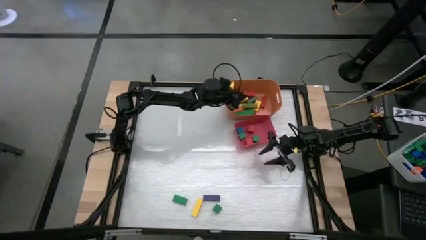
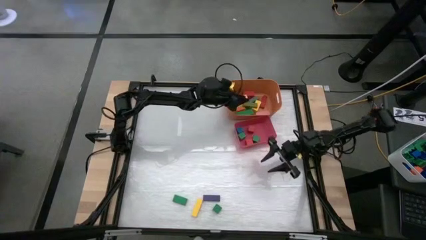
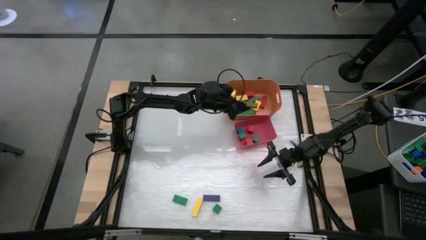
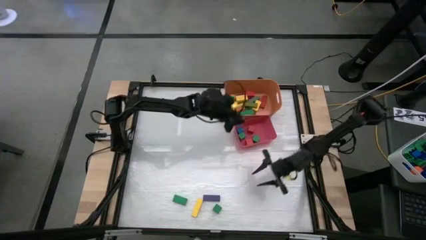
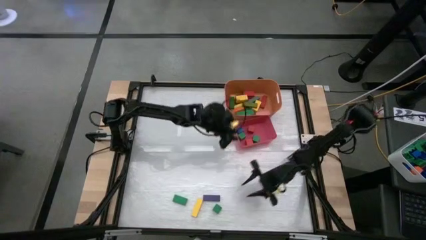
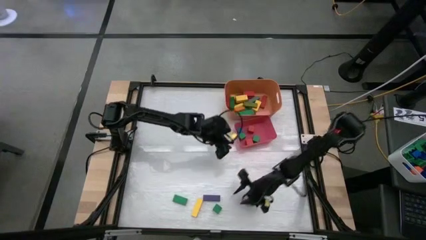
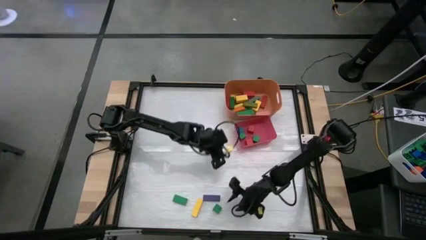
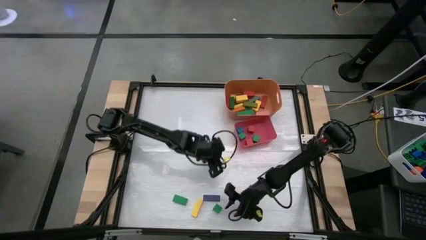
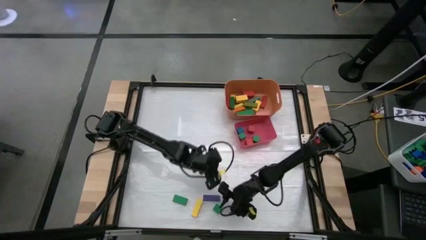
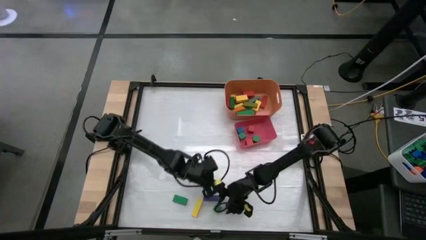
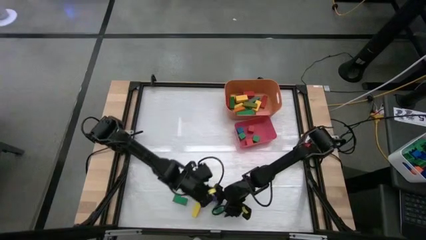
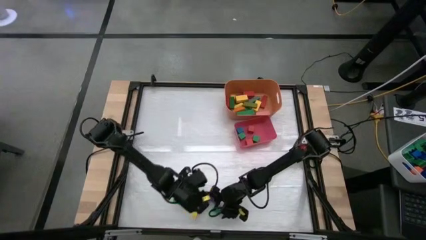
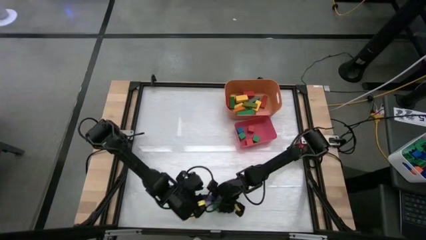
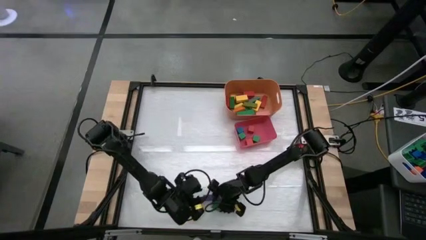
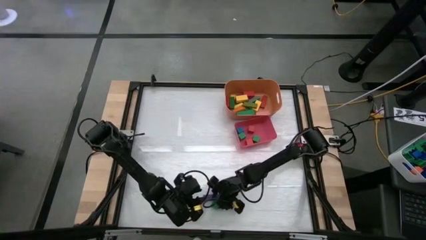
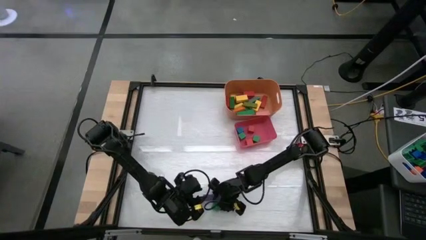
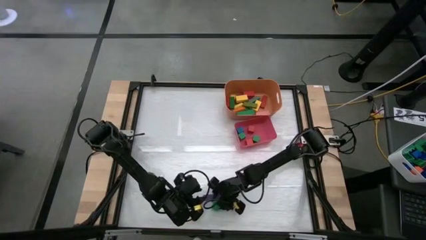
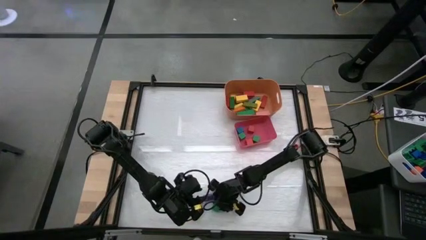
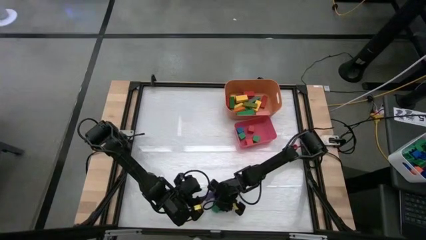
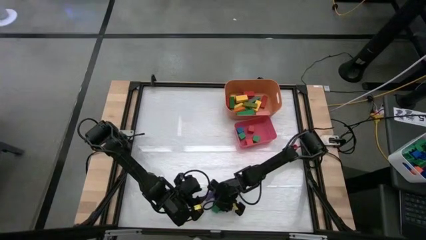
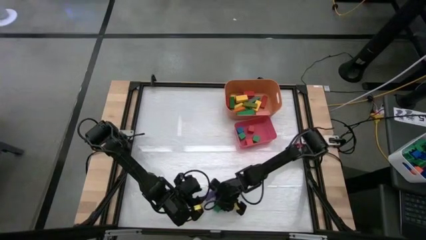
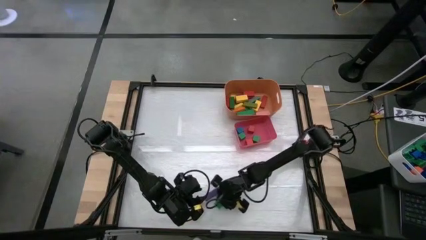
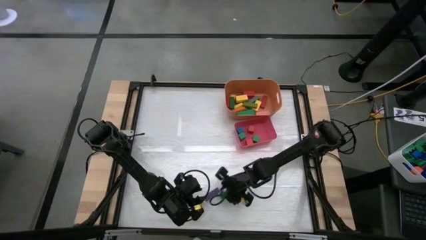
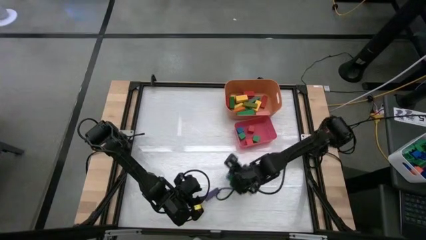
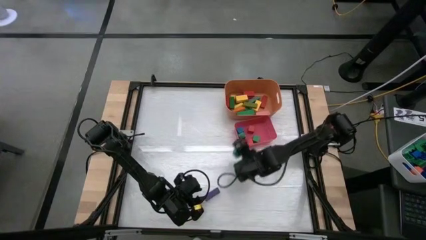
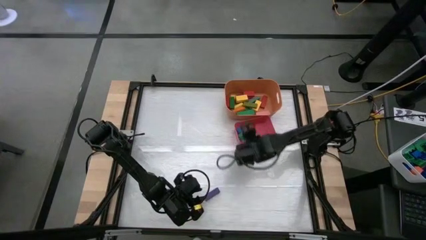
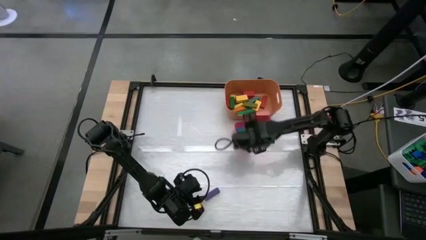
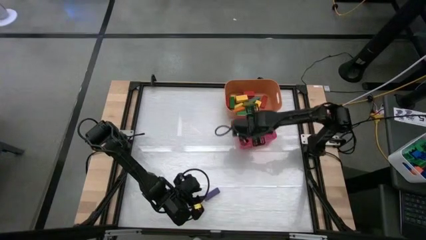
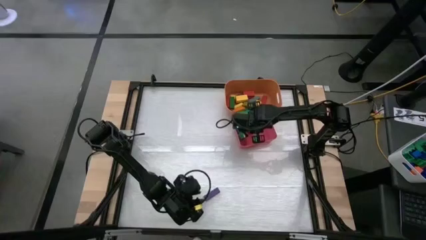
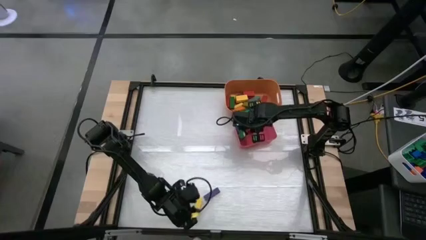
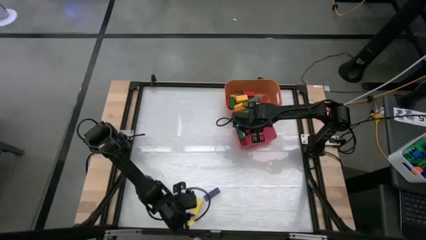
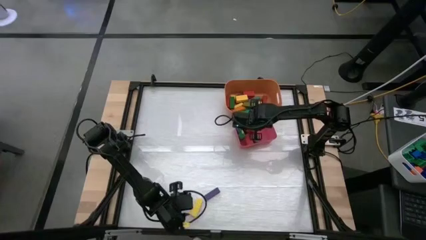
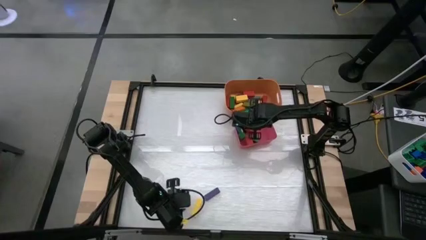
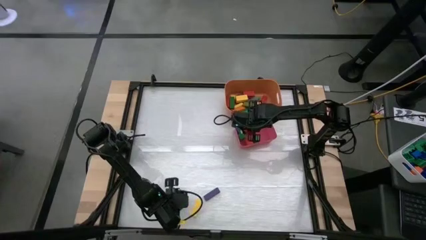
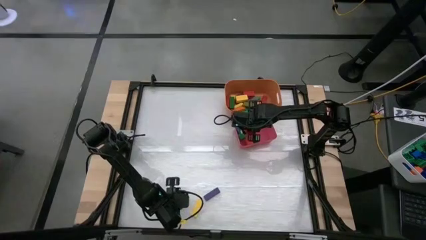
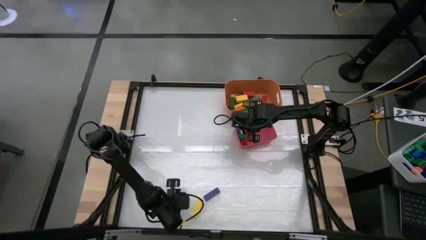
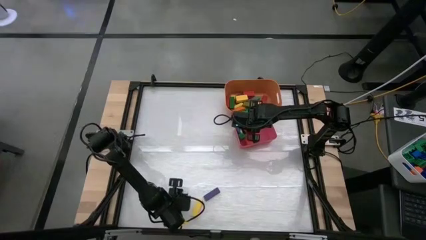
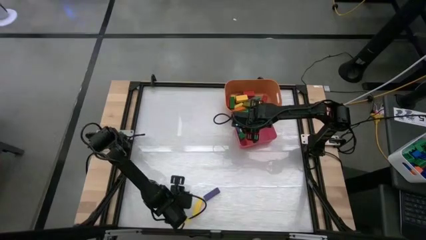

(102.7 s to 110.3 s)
Task: Sort blocks by size
Put the green square block into the red bin

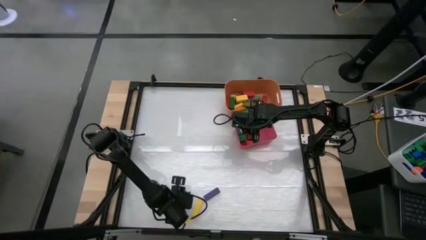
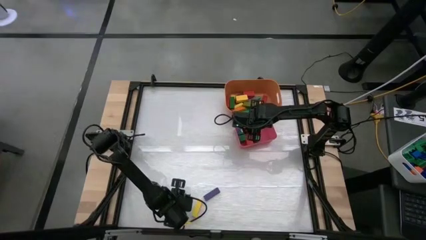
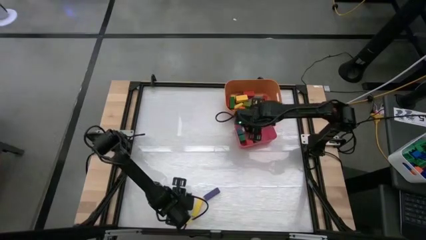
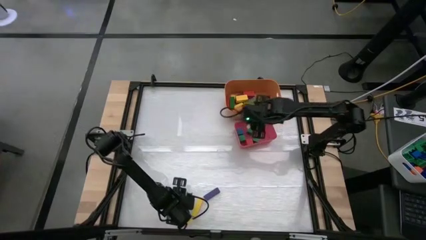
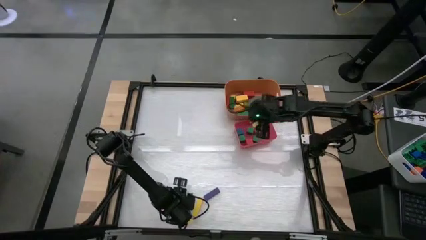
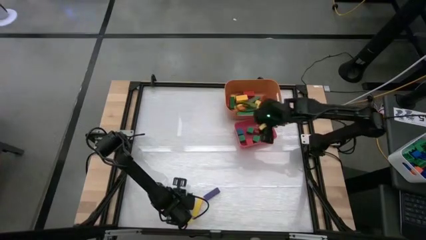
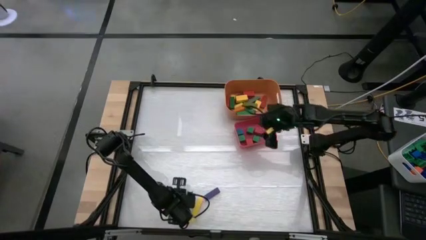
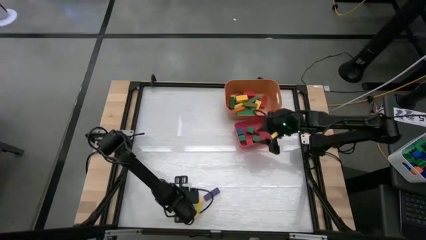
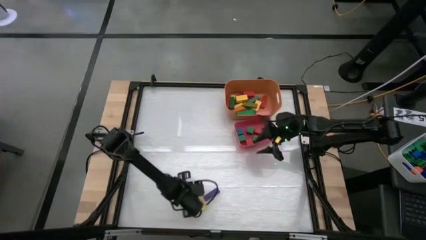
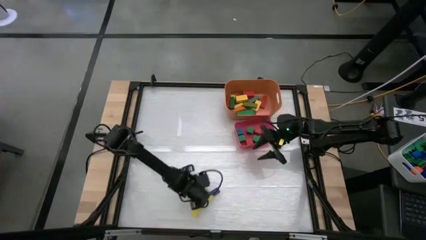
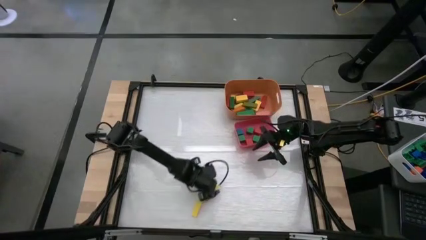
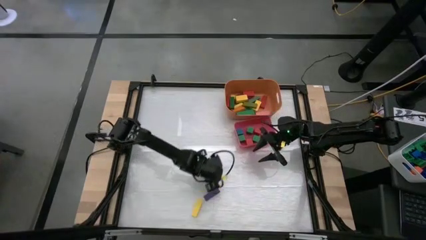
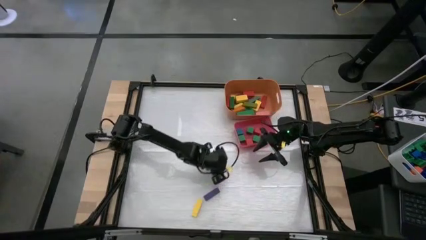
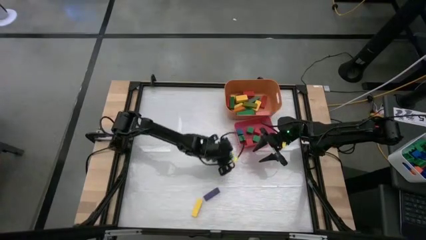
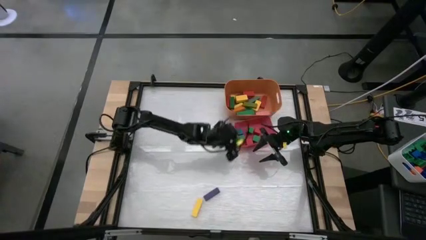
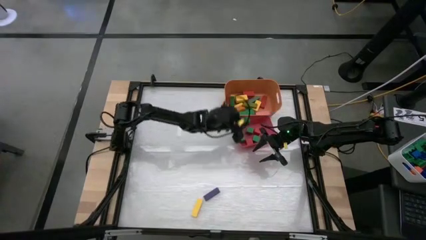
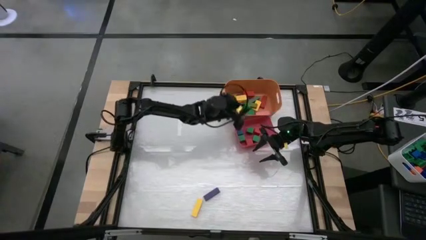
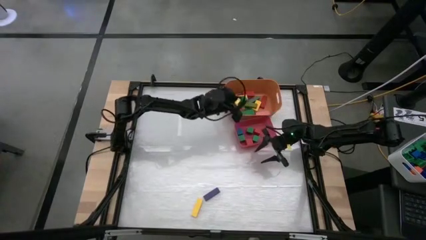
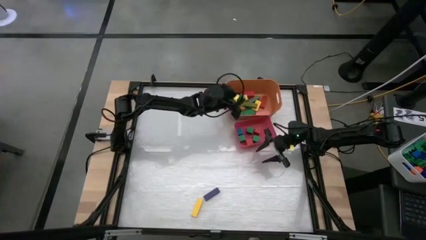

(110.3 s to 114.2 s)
Put the green rectangle block into the orange bin

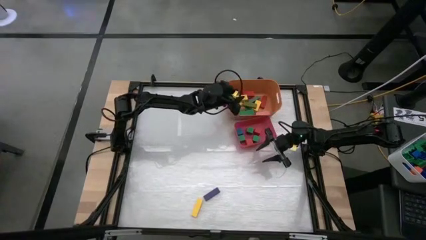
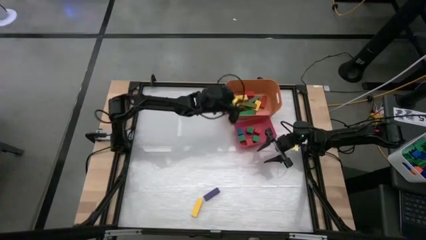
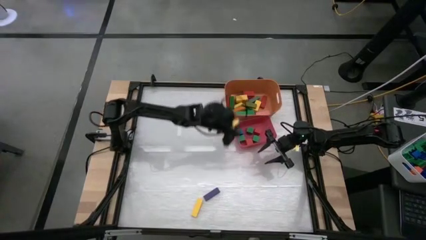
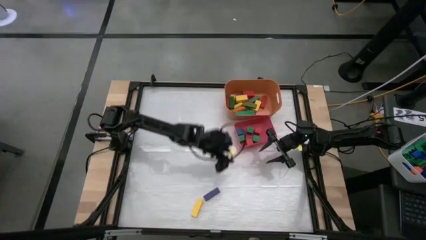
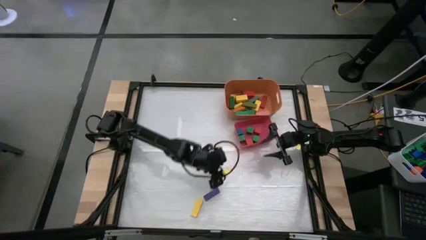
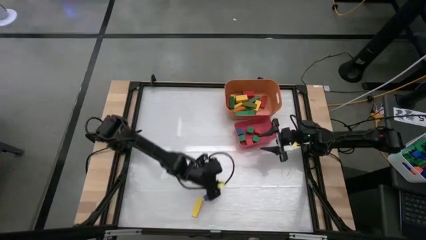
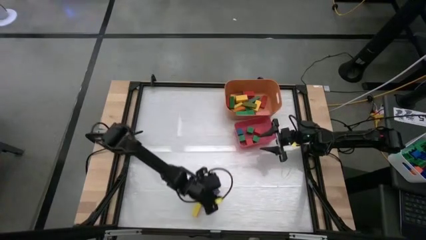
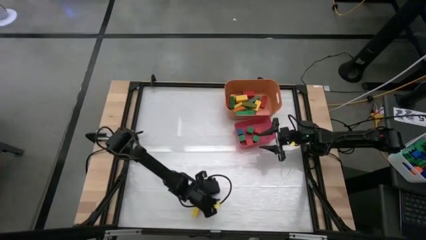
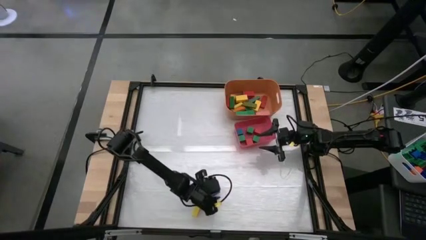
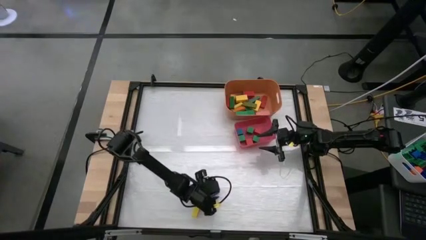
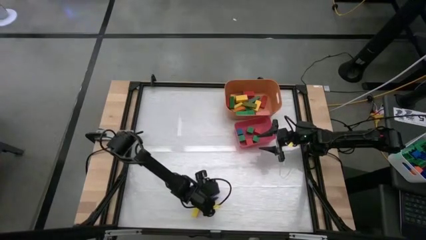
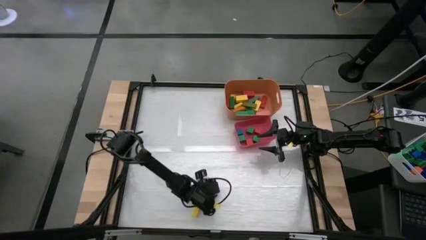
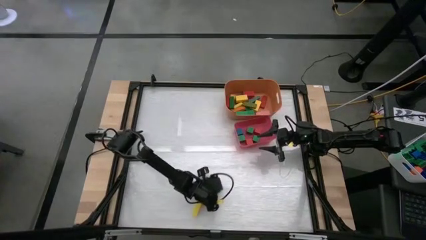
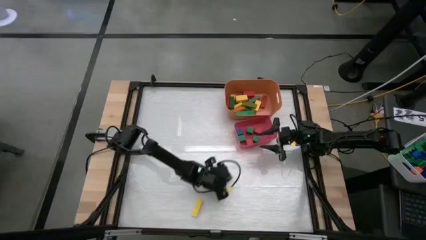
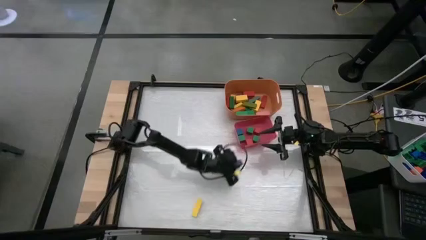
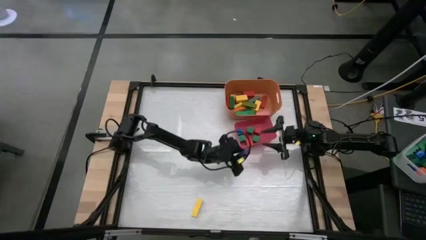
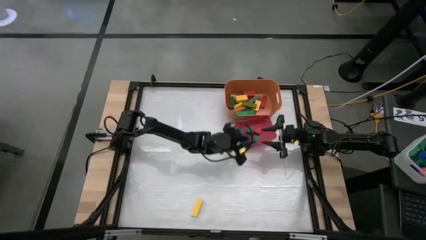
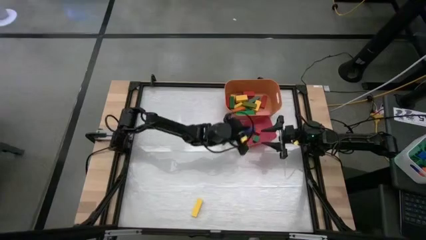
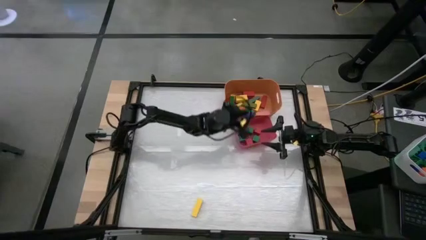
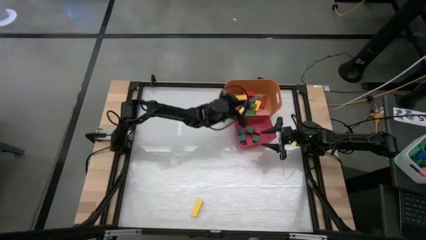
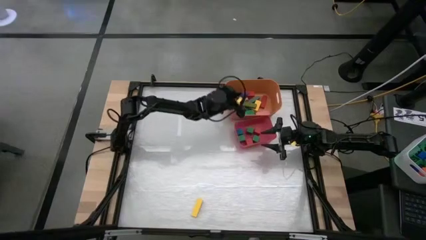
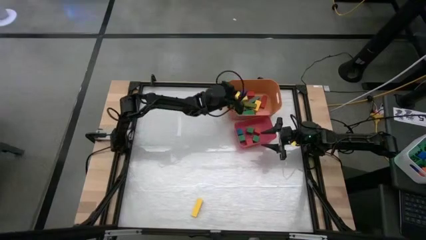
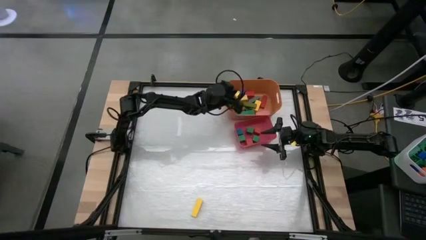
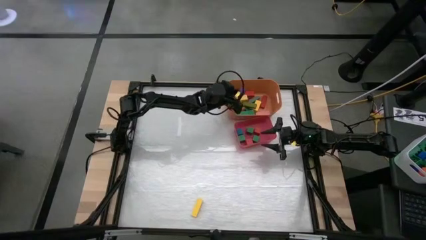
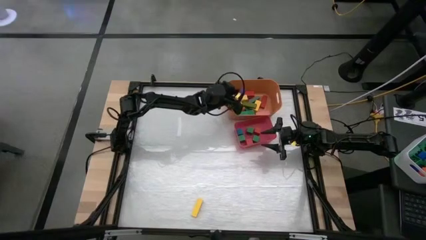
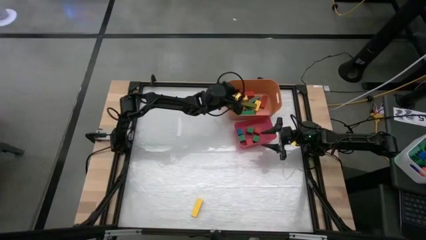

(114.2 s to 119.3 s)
Put the violet rectangle block into the orange bin
